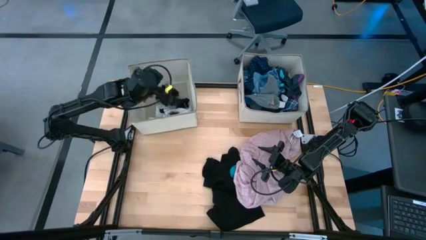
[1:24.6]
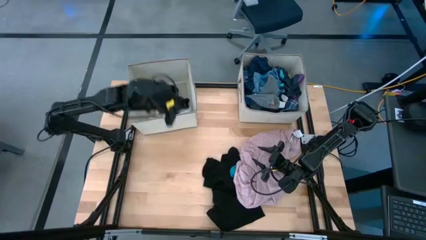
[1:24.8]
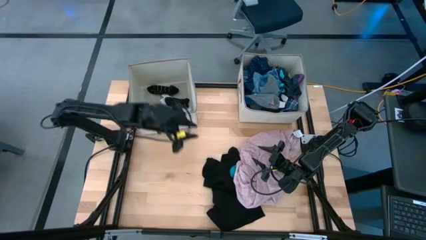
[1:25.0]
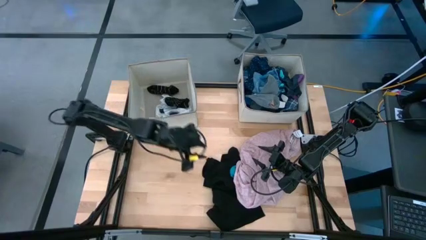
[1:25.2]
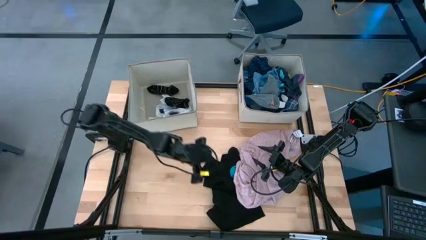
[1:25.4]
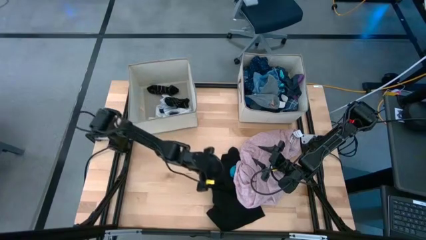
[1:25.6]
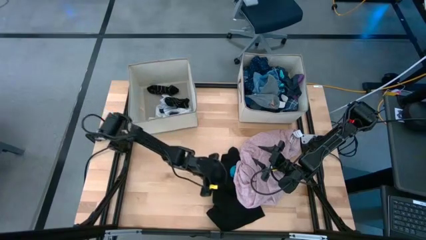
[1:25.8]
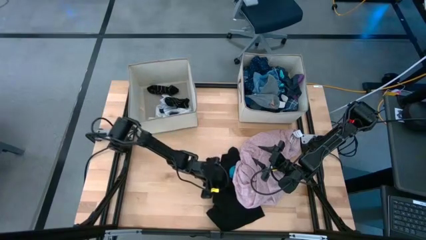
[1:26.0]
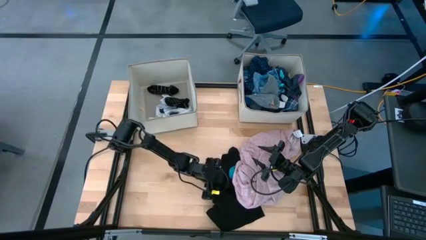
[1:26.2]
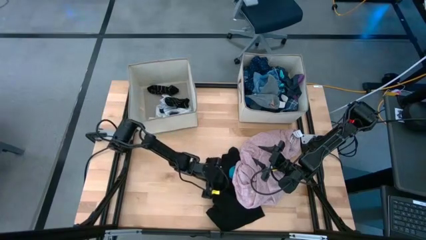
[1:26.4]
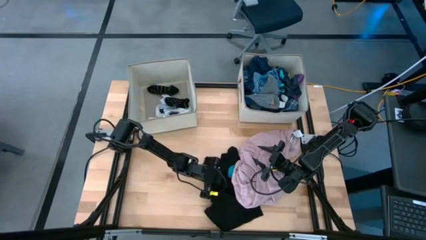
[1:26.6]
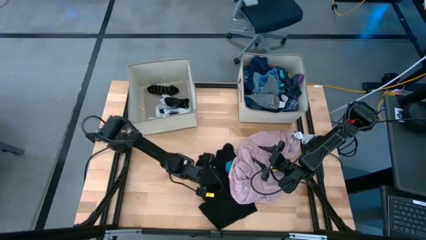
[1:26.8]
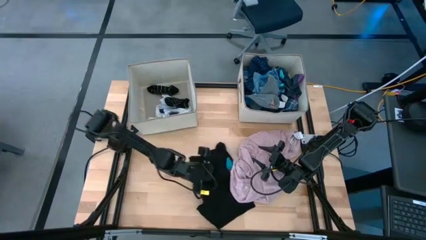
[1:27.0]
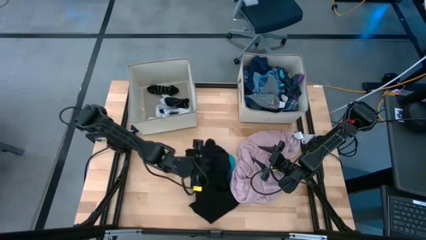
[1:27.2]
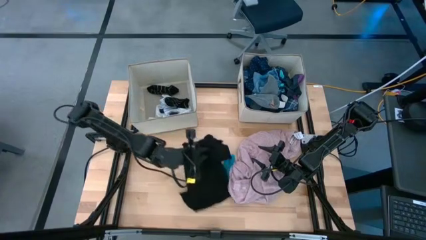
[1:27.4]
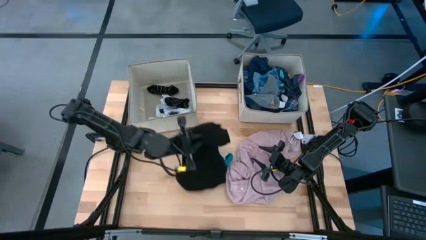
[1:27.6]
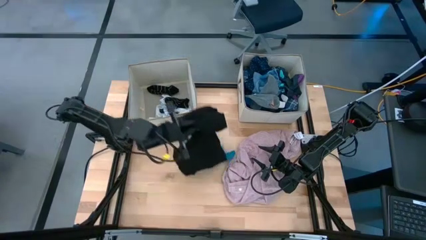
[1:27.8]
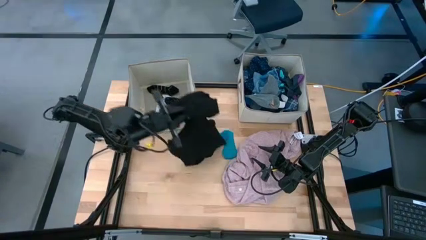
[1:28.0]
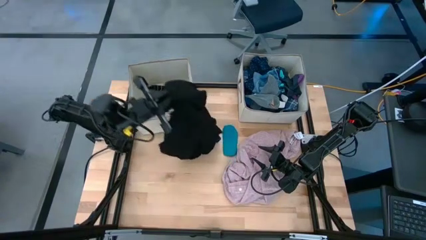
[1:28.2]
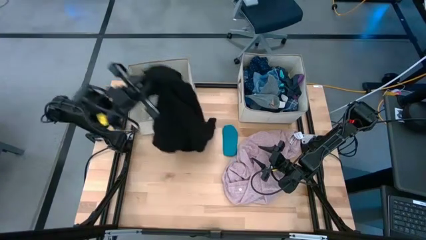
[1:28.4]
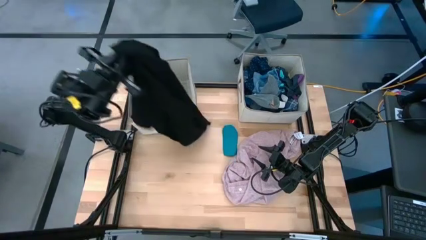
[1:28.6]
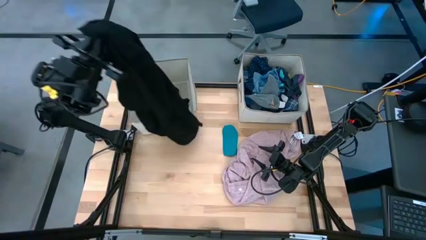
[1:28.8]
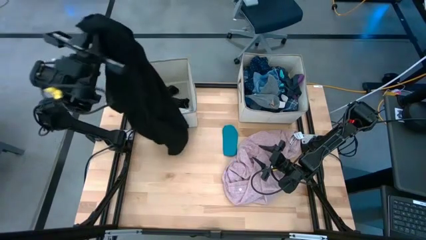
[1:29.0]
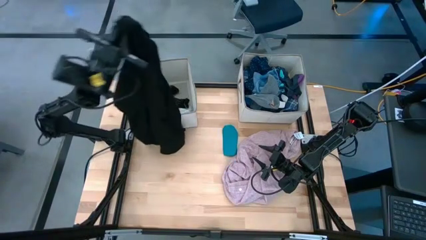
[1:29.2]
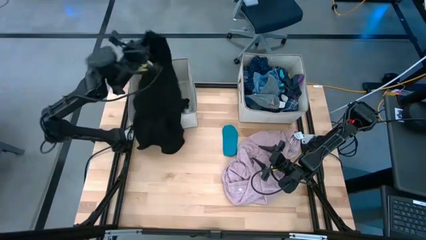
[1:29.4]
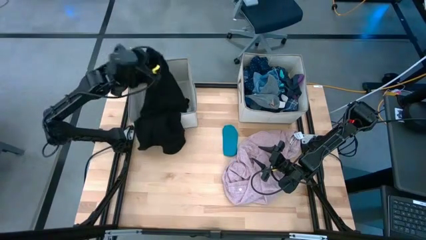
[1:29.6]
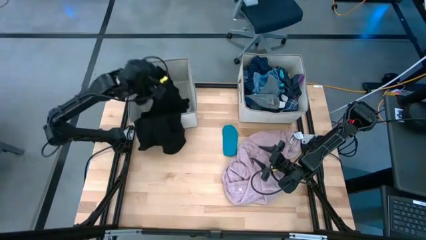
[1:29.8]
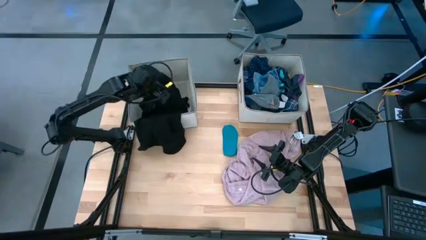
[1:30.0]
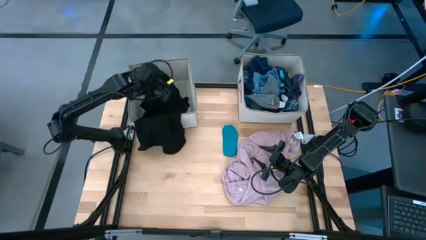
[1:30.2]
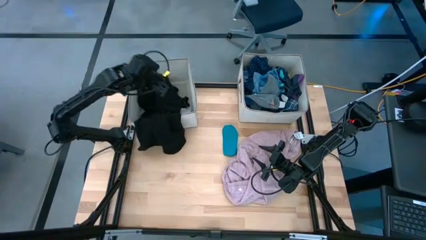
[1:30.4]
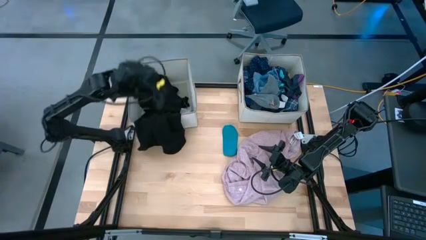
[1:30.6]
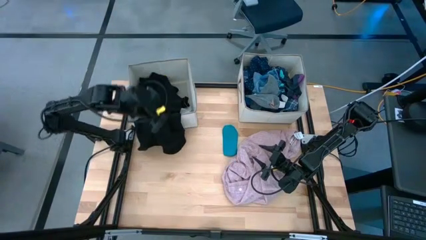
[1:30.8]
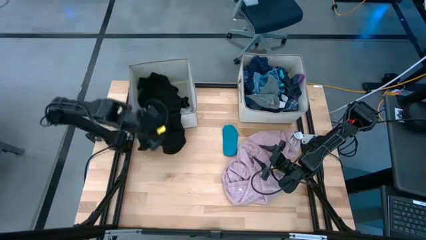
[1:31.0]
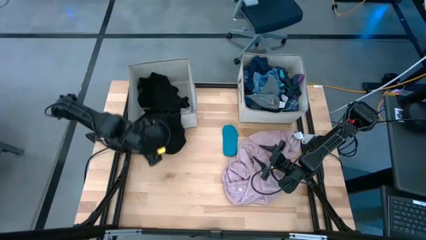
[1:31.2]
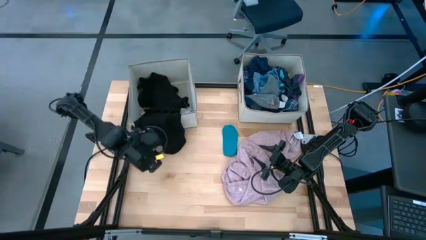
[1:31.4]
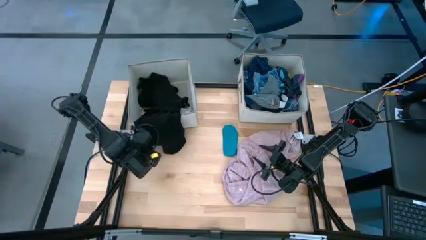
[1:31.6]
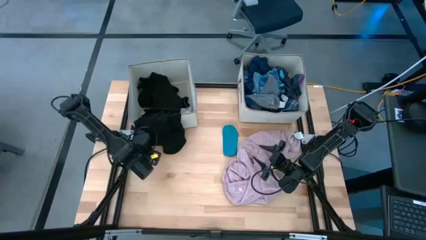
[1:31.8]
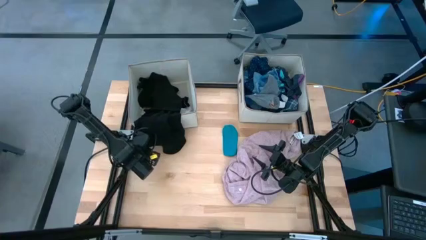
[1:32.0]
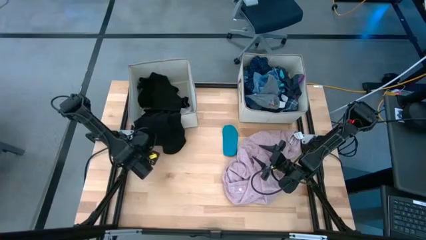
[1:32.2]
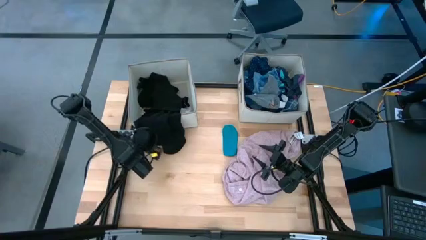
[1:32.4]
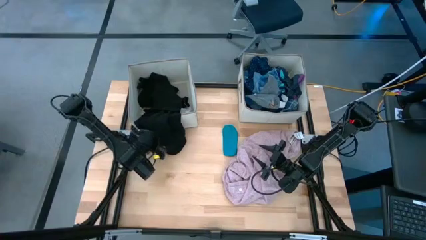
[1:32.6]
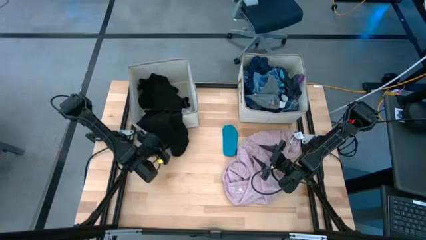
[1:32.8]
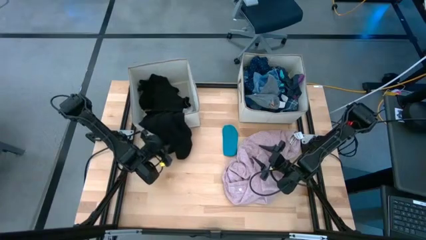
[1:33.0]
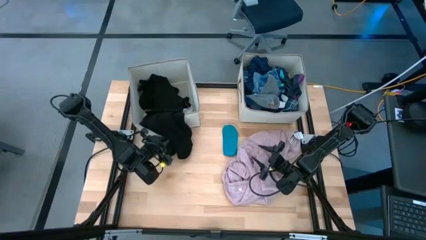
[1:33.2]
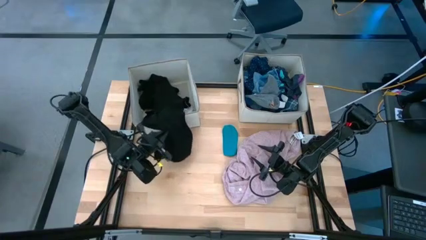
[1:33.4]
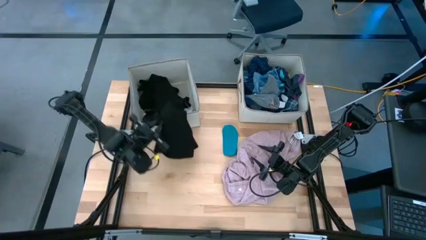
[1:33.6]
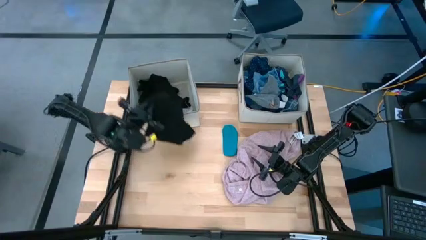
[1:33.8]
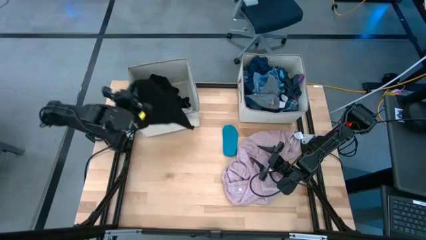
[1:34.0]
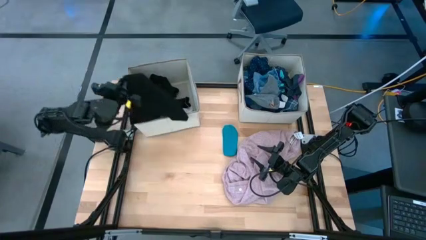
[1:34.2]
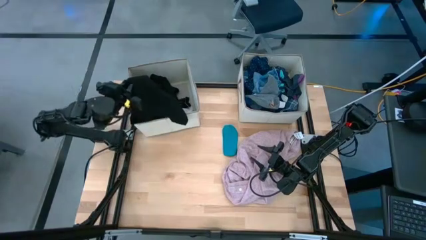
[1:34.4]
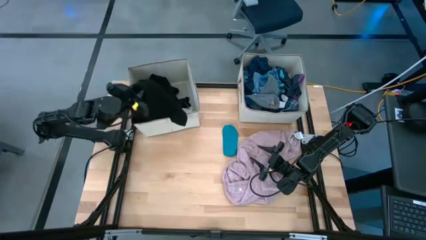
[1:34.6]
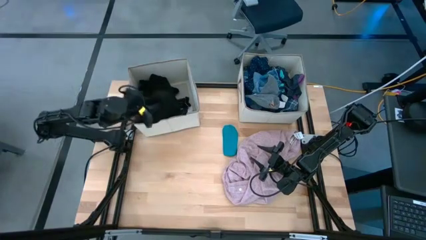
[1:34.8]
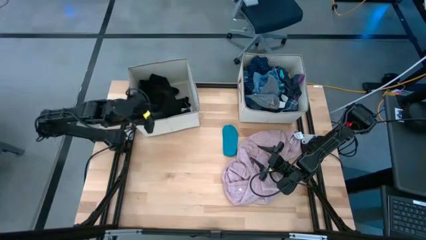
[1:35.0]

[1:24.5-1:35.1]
Task: Sort clothes
Put the black cloth into the left laundry bin

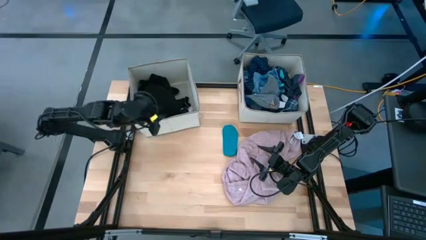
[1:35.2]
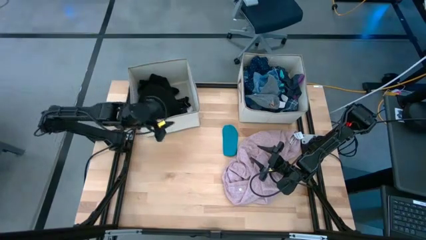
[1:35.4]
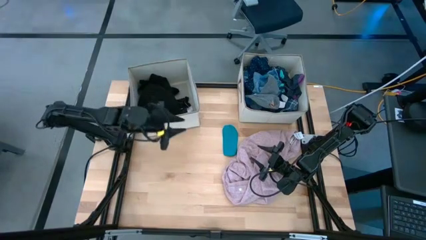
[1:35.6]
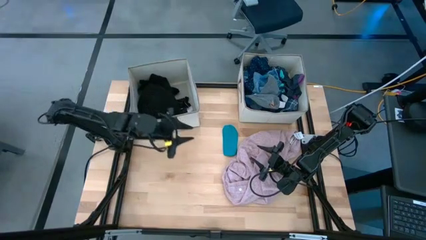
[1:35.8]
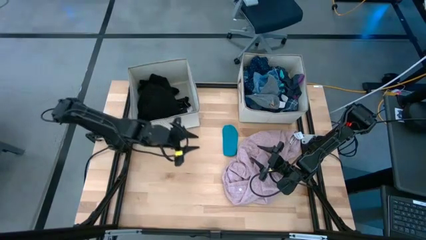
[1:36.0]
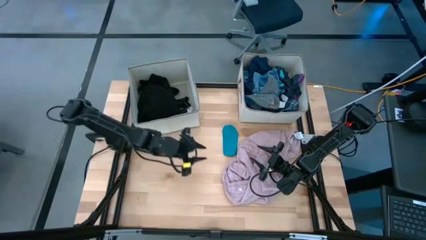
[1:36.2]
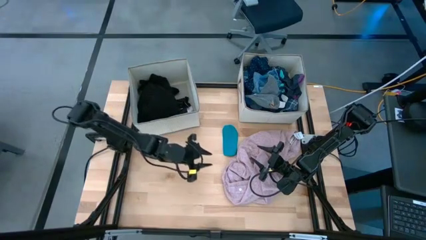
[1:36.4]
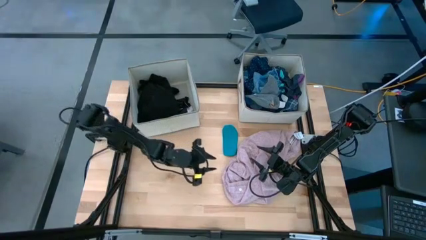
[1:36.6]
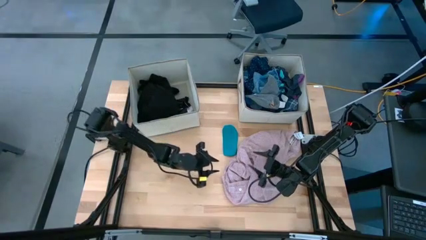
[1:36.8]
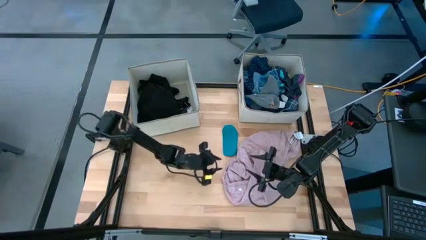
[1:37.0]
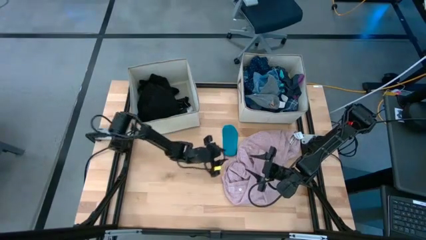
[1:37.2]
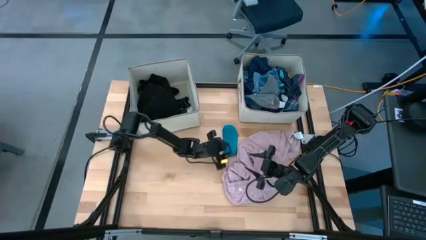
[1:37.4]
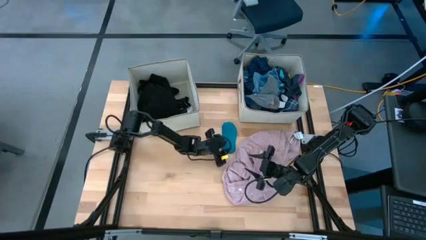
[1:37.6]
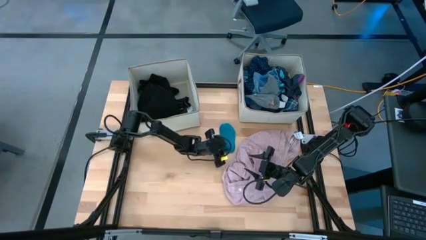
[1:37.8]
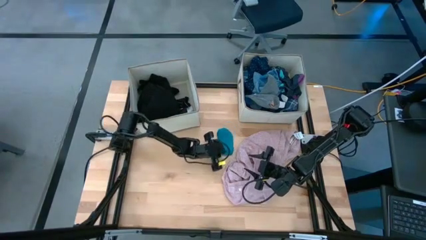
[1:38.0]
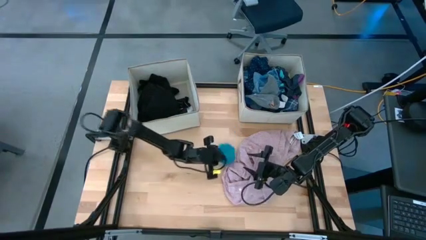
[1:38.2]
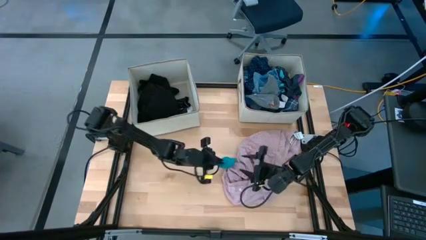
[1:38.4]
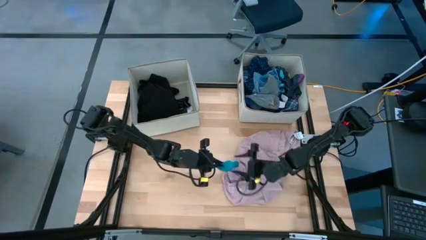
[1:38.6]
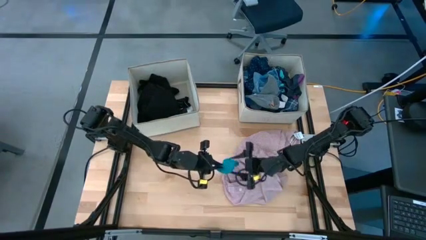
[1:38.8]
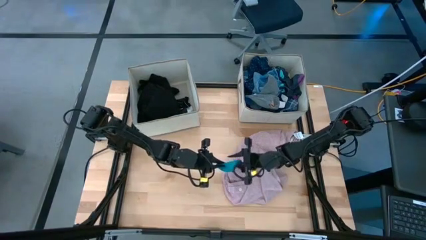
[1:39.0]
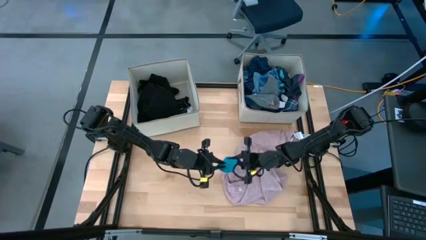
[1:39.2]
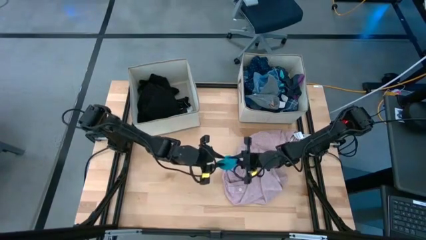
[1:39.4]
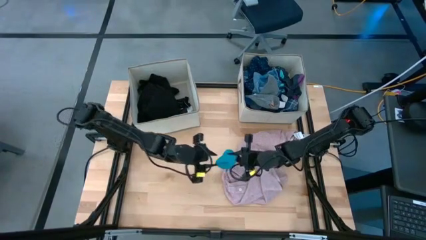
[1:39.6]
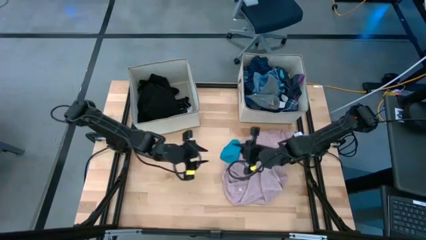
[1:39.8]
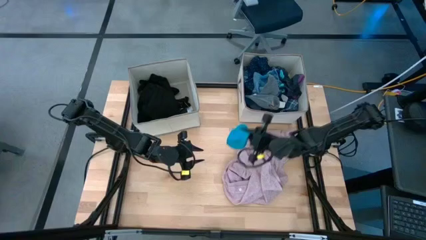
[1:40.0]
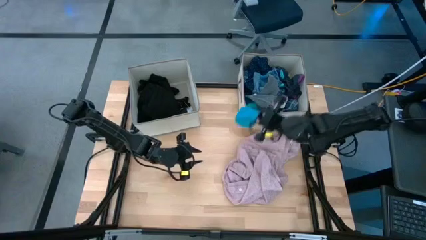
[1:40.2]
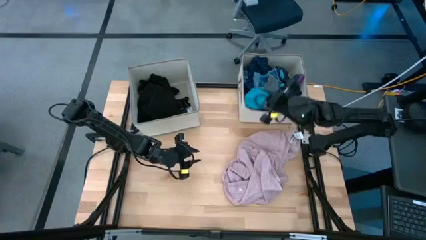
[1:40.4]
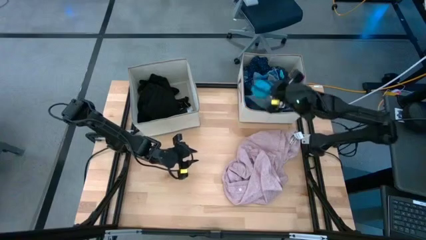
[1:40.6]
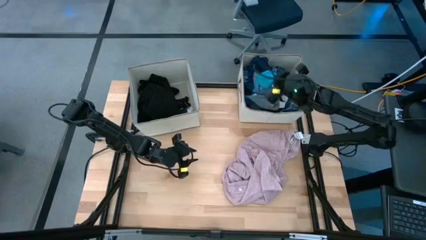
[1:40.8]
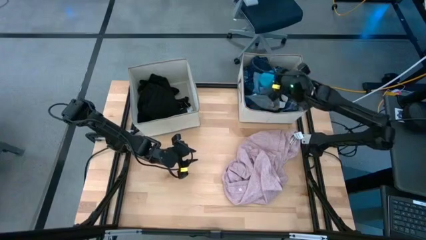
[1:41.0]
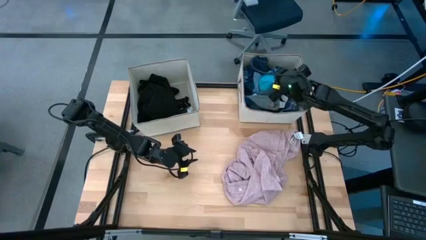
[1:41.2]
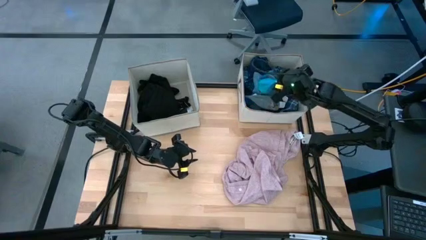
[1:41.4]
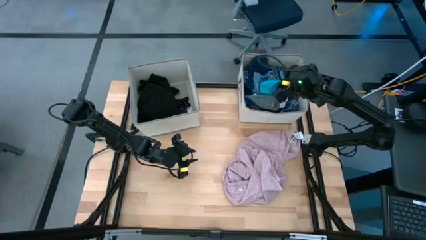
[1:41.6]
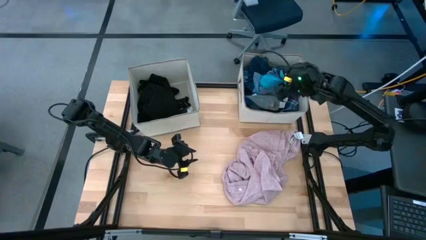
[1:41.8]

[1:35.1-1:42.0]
Put the light blue sock into the right laundry bin
